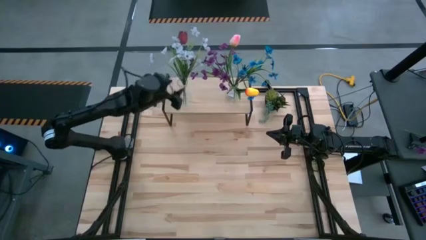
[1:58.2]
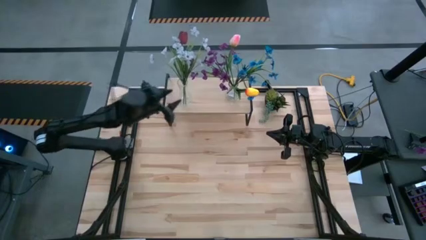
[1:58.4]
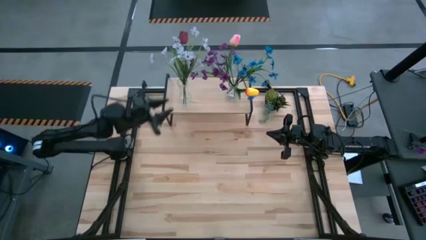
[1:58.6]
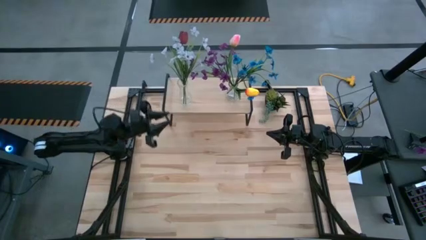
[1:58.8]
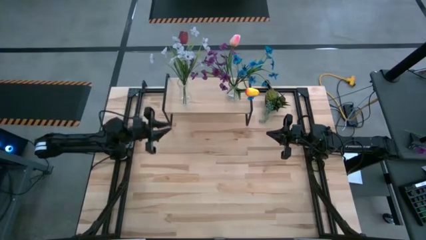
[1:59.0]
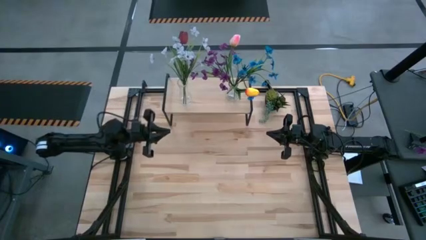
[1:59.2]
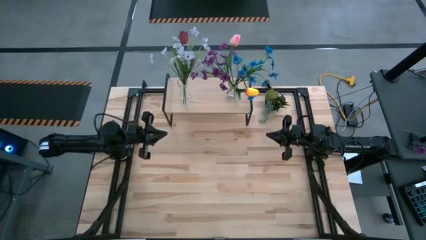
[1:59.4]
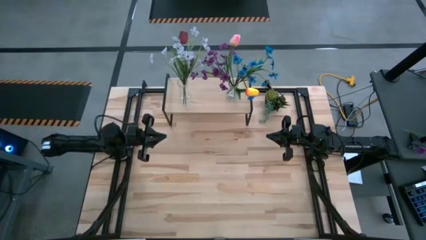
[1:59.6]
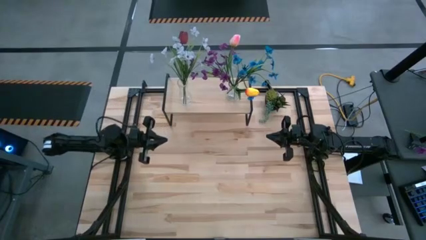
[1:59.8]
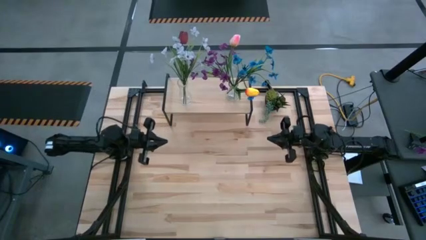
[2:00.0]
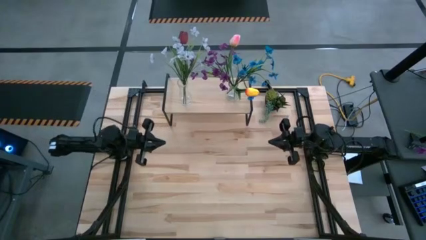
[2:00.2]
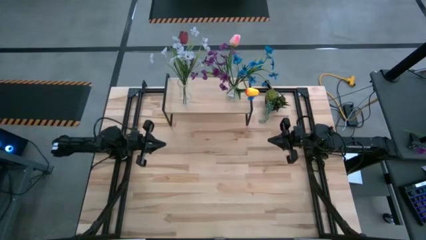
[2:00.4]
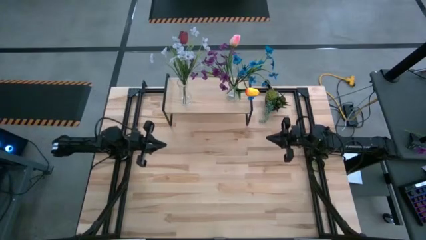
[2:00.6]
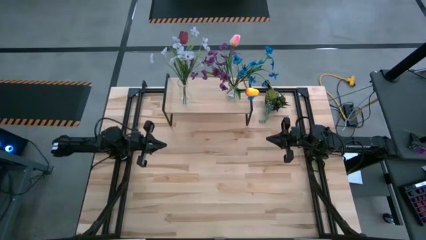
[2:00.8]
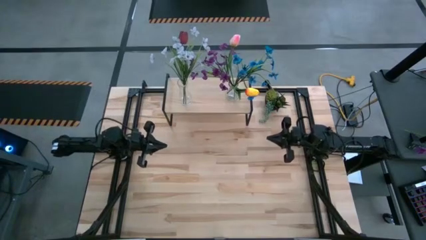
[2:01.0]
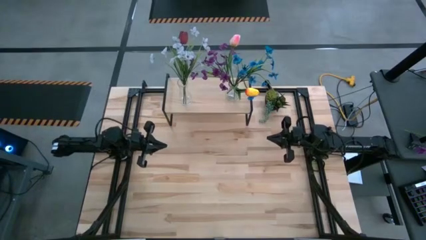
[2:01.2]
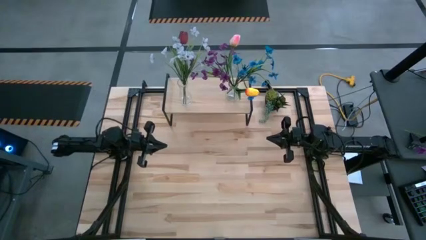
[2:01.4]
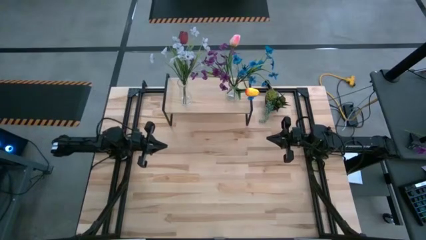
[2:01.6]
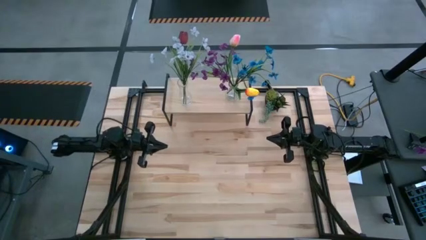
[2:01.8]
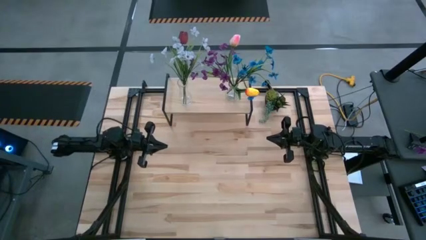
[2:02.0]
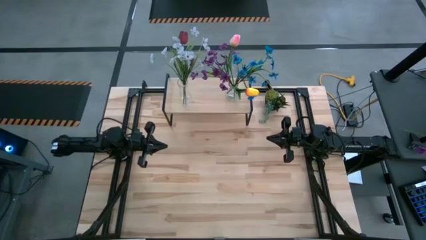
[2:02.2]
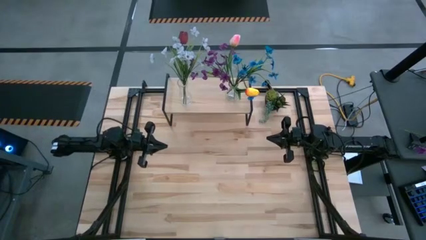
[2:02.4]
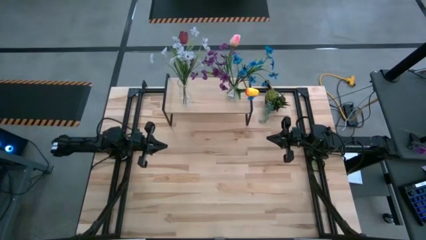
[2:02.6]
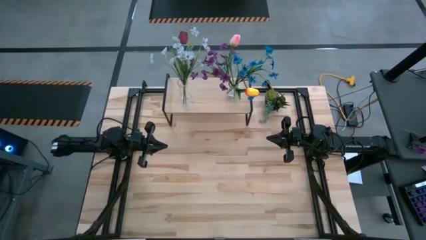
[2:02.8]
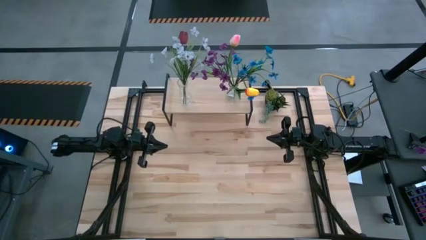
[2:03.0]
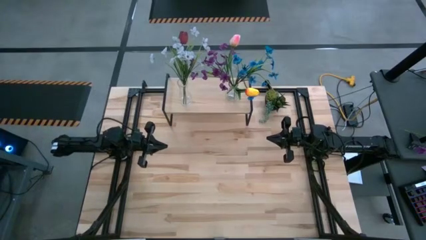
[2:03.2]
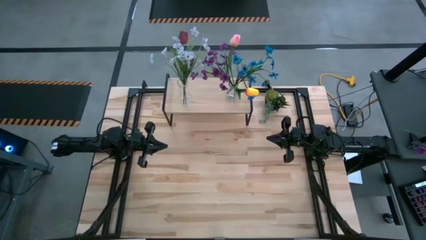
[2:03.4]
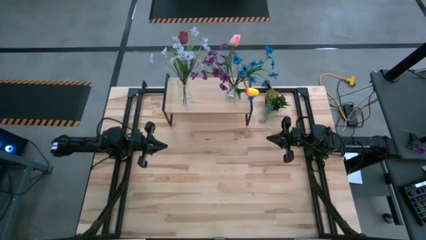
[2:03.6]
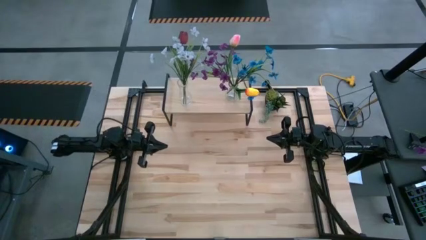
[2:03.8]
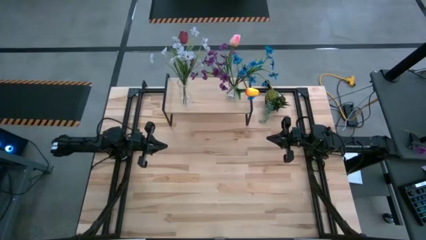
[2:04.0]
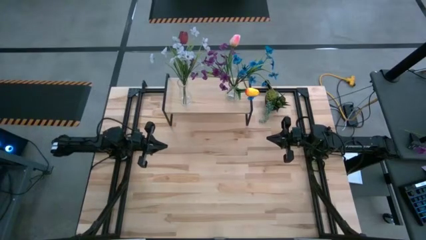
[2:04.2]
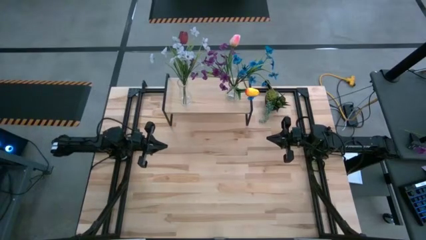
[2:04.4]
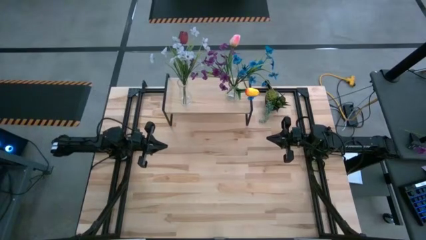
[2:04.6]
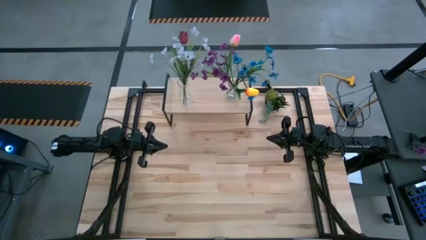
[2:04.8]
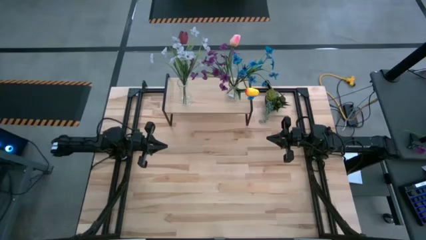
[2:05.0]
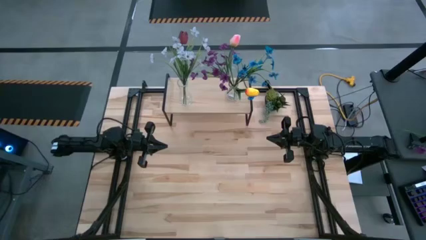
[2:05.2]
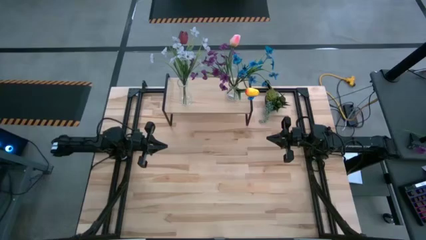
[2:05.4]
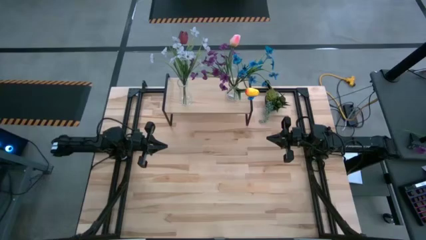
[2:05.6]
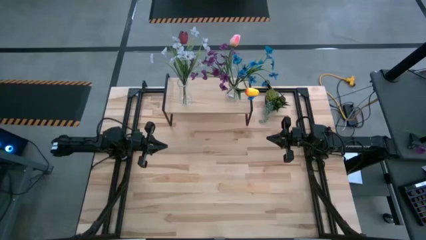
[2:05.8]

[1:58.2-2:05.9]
Task: Pick and place flowers into a vace then onto a shelf
Return to Home Position

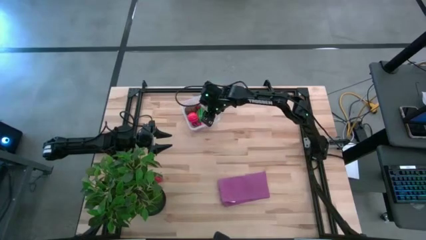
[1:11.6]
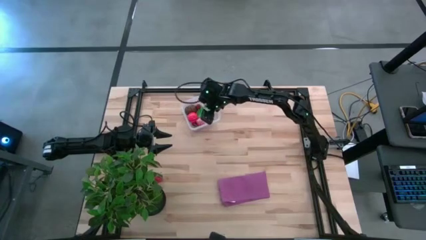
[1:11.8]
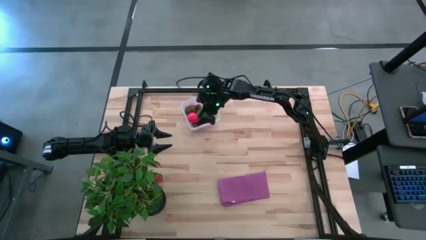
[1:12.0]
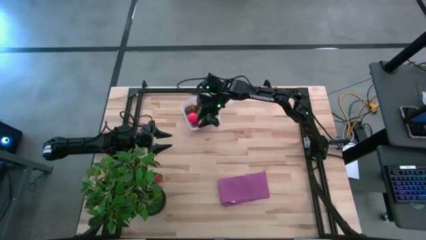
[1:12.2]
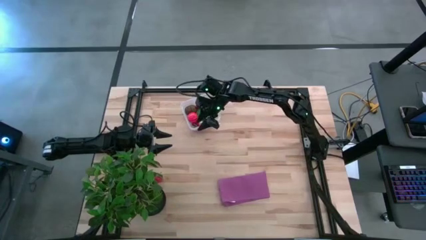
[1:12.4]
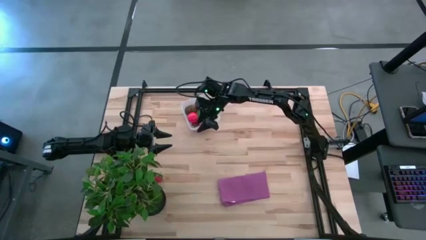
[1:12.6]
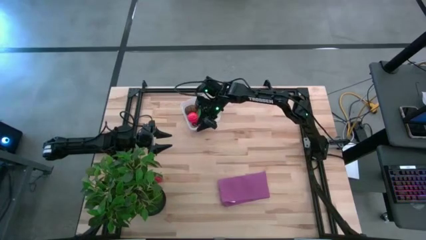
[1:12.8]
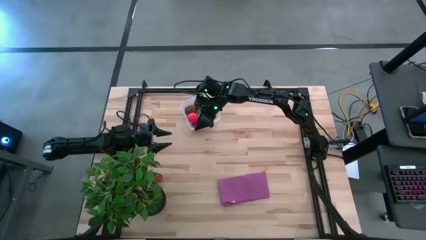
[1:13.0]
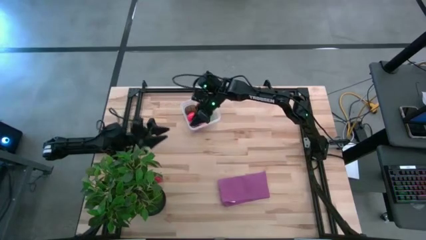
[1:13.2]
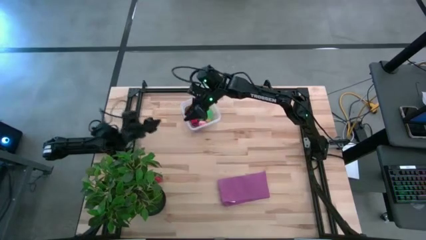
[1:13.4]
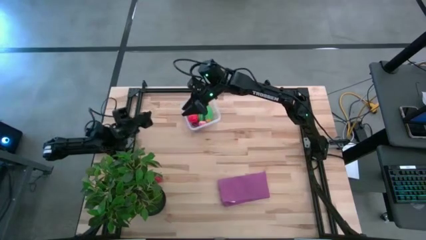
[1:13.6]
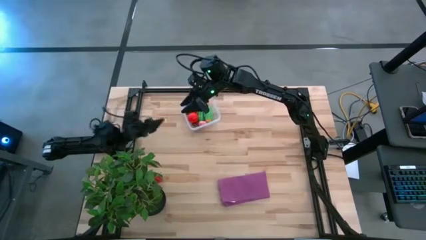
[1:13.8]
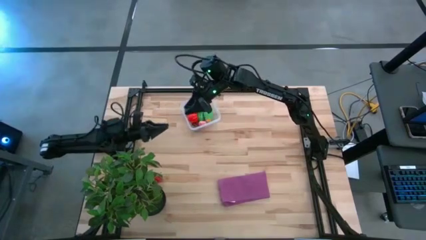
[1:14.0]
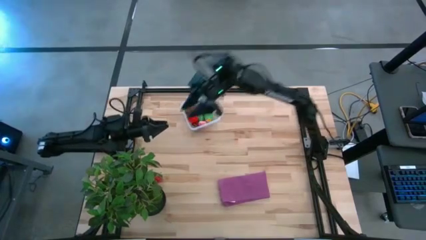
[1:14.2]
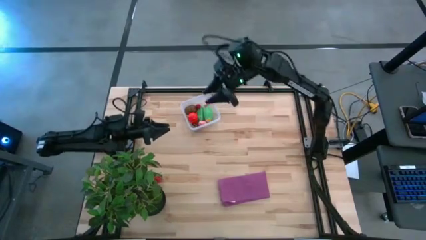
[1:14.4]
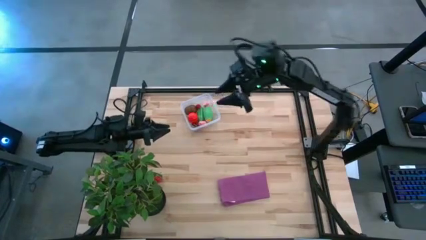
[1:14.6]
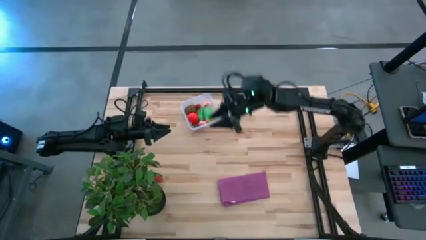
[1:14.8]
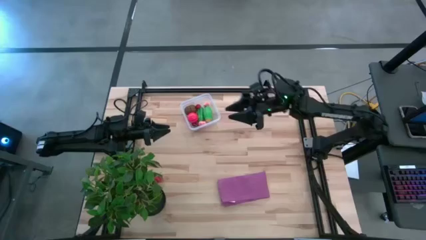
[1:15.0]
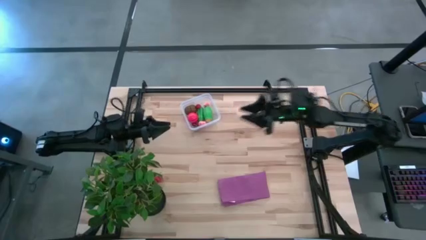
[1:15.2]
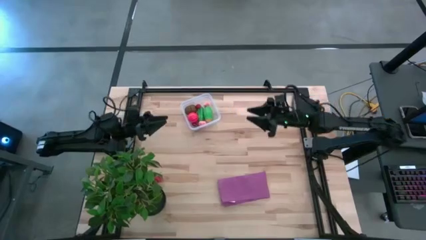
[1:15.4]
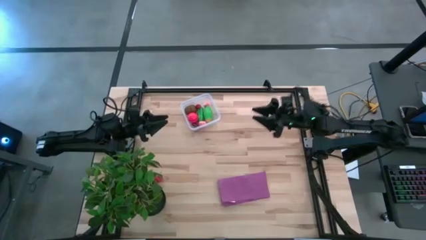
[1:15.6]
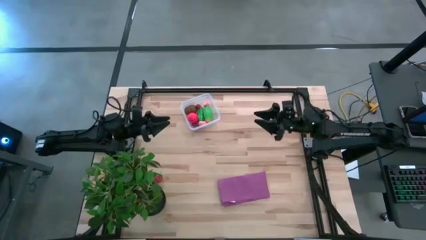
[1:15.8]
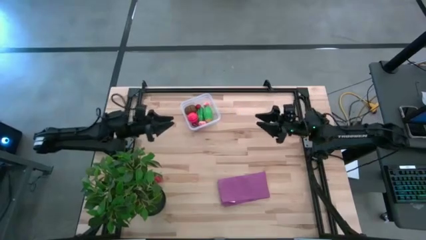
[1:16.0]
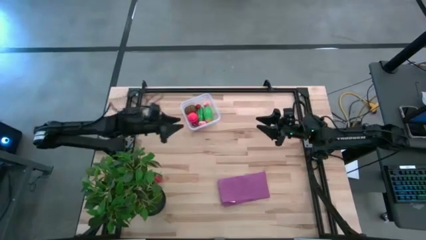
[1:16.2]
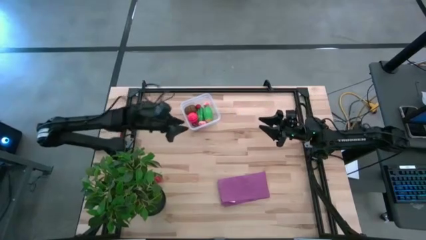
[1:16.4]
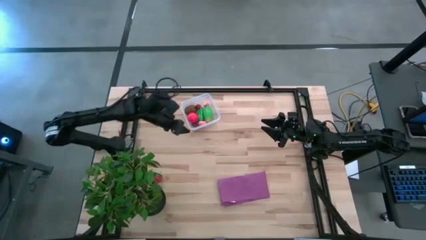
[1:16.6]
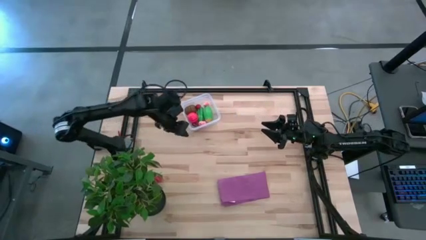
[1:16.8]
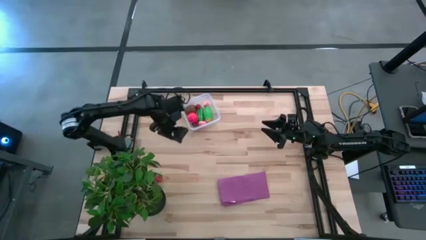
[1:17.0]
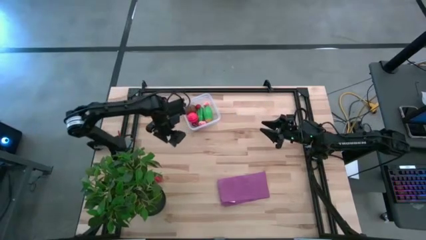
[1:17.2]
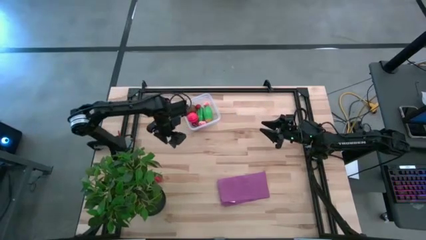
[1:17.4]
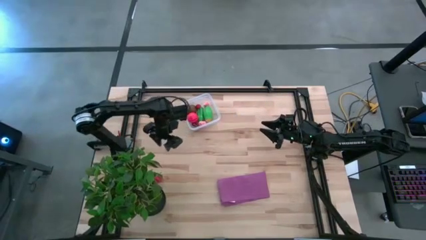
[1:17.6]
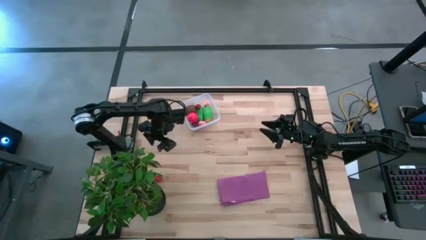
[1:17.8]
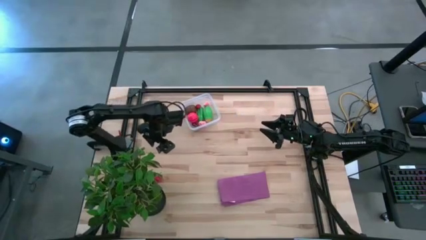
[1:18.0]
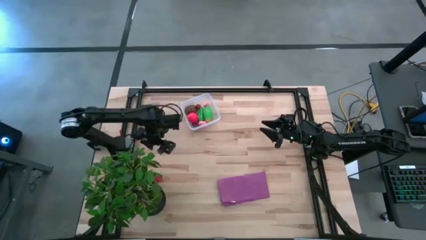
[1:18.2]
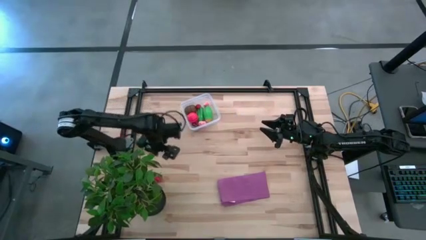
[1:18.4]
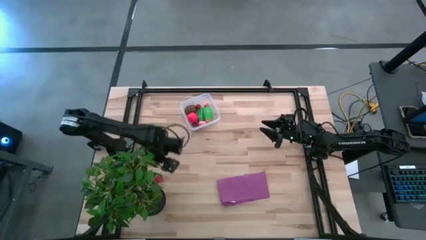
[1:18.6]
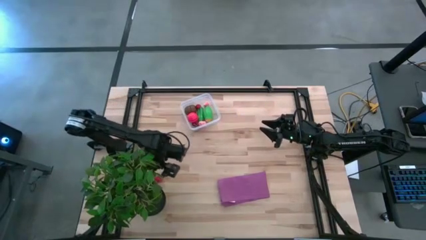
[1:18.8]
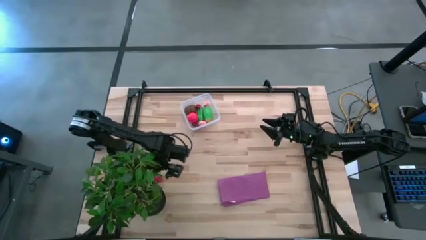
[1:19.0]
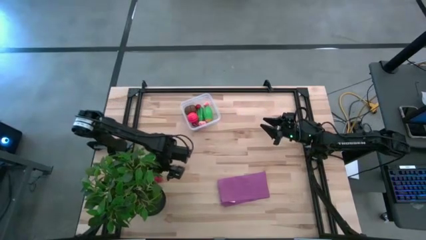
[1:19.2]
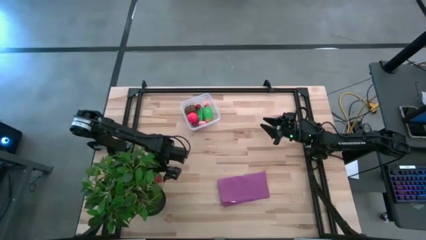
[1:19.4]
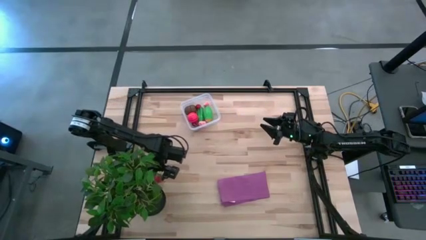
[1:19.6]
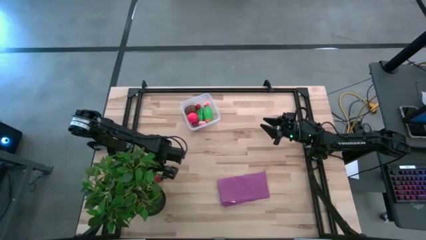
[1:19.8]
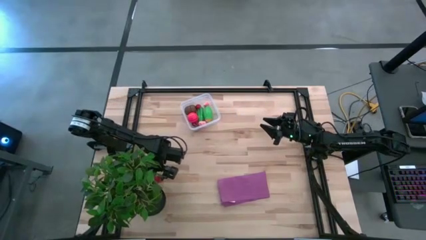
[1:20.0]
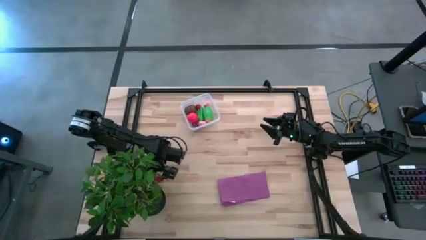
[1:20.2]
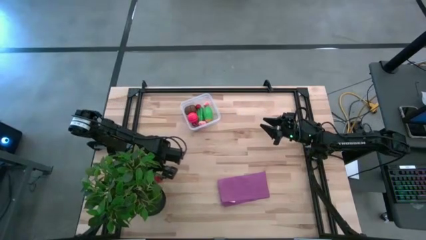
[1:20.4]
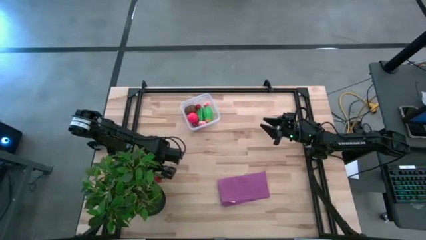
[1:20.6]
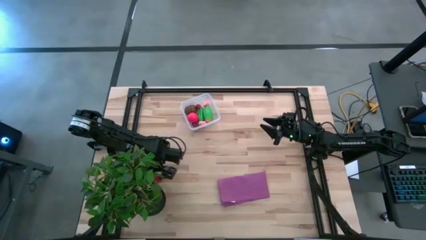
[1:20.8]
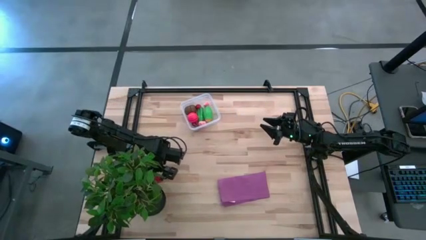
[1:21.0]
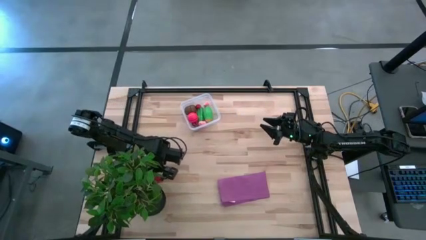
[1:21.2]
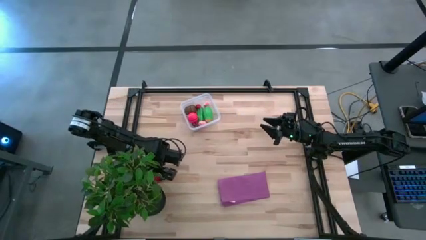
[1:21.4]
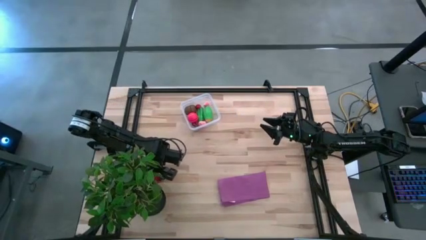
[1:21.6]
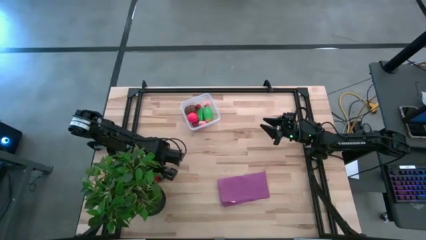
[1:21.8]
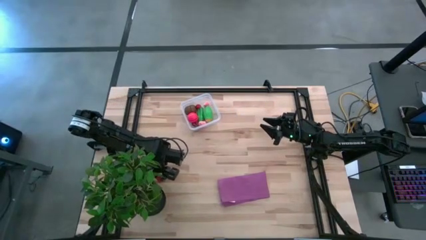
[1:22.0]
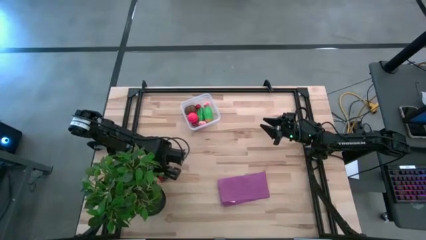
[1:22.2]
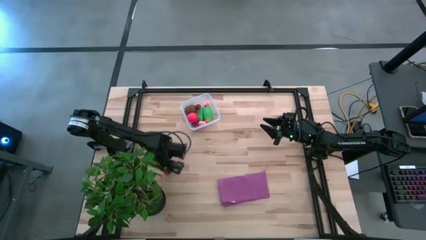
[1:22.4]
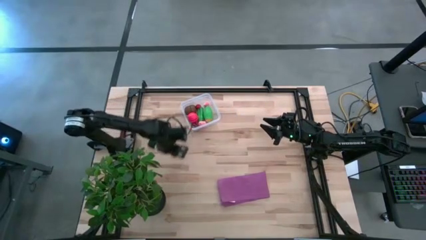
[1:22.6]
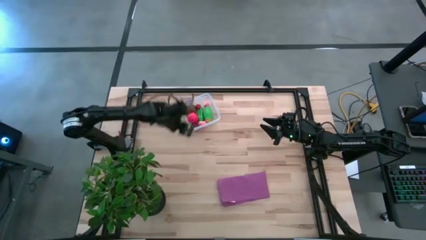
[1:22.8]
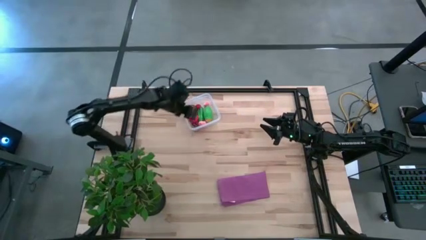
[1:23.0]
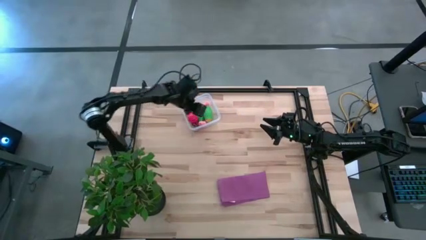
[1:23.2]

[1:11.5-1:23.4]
Task: Pick and placing Produce into tupperware
Put the red strawberry into the transparent bin
